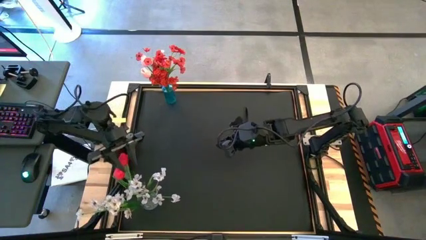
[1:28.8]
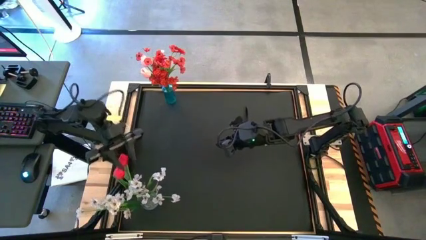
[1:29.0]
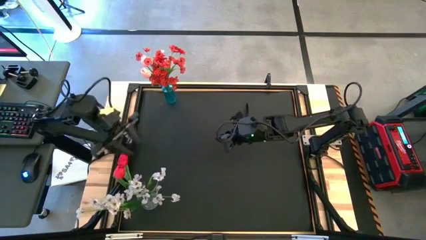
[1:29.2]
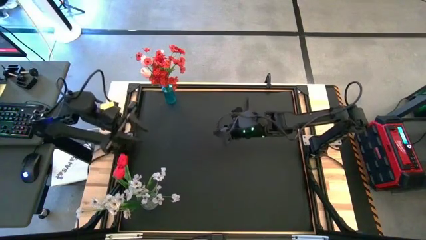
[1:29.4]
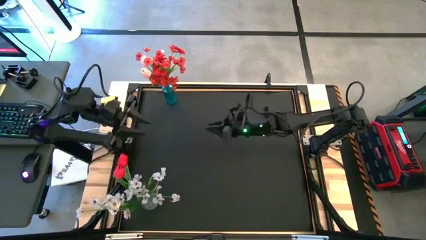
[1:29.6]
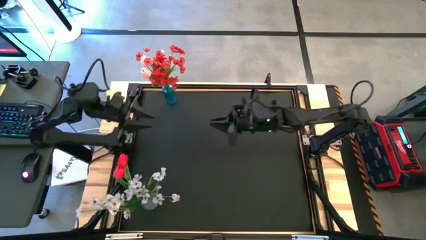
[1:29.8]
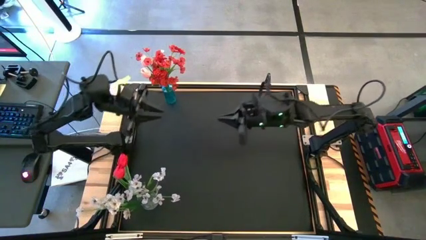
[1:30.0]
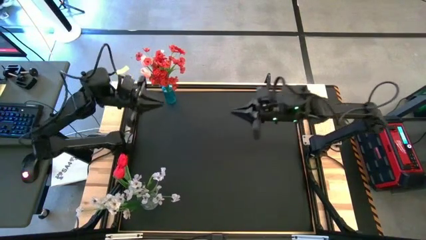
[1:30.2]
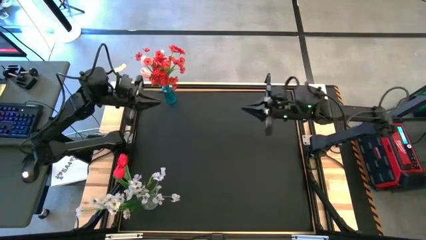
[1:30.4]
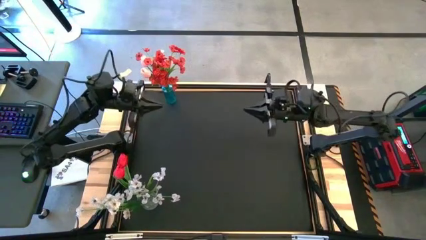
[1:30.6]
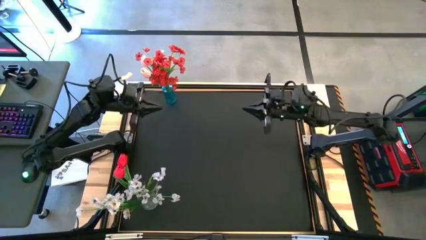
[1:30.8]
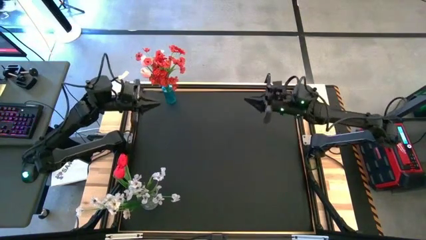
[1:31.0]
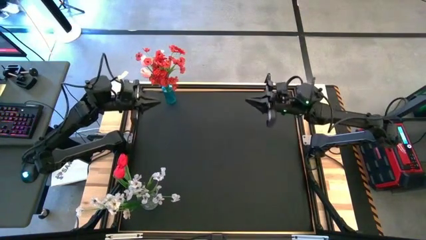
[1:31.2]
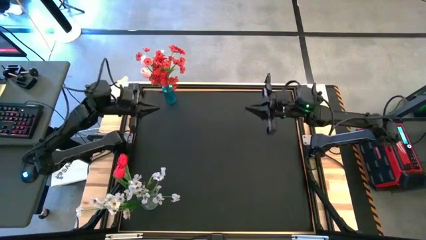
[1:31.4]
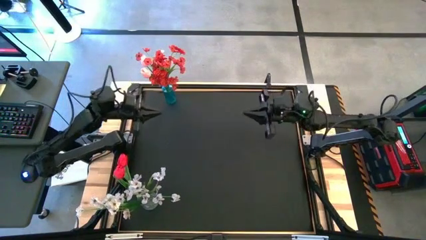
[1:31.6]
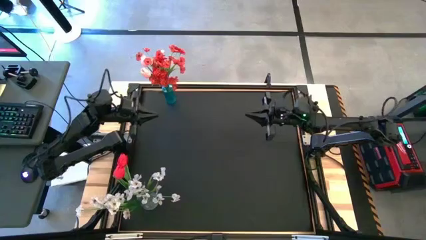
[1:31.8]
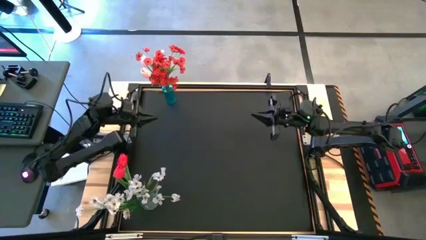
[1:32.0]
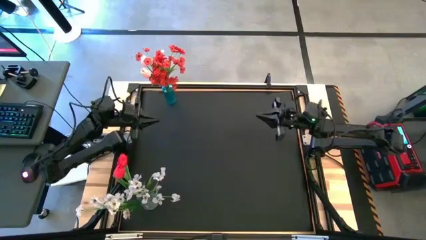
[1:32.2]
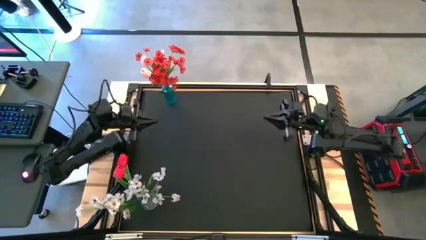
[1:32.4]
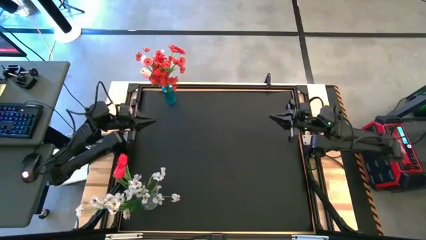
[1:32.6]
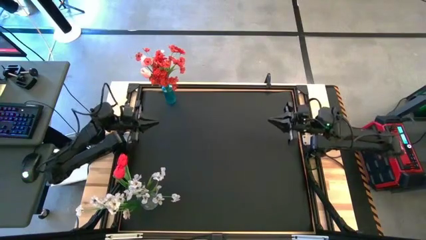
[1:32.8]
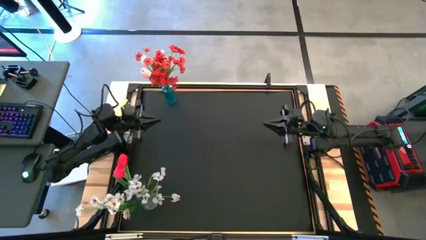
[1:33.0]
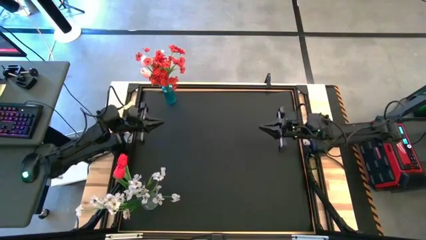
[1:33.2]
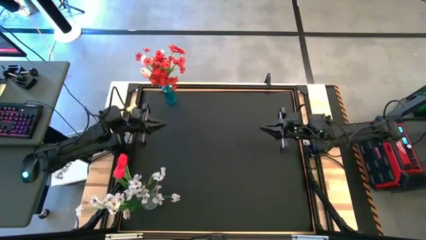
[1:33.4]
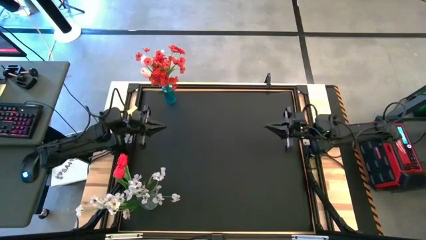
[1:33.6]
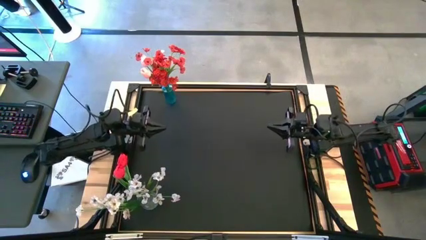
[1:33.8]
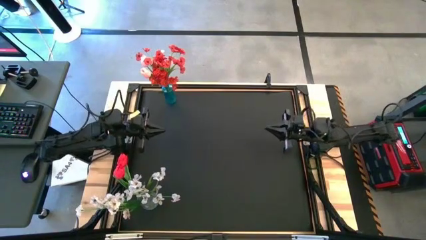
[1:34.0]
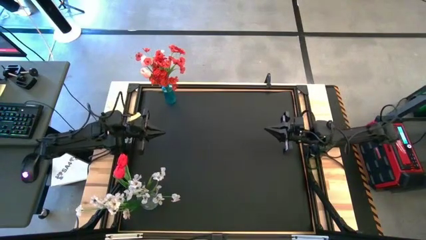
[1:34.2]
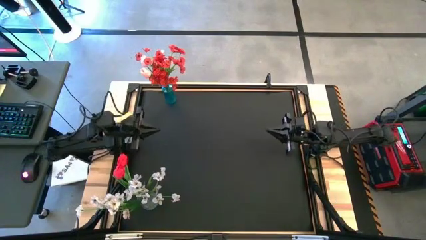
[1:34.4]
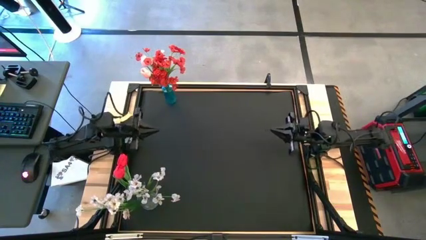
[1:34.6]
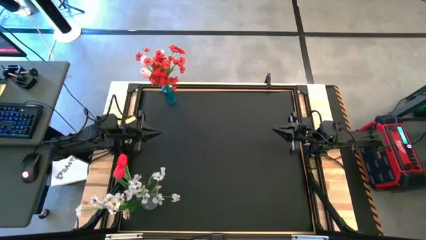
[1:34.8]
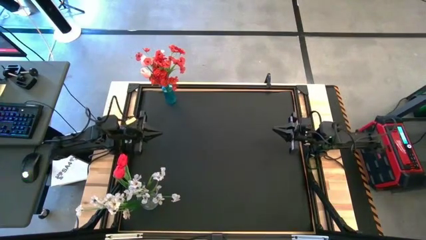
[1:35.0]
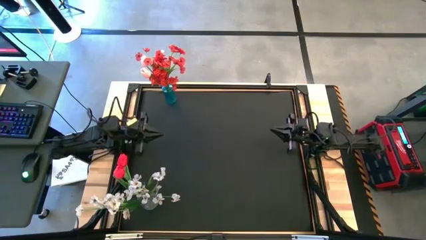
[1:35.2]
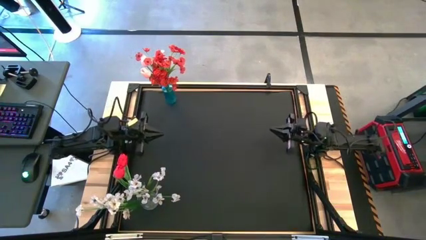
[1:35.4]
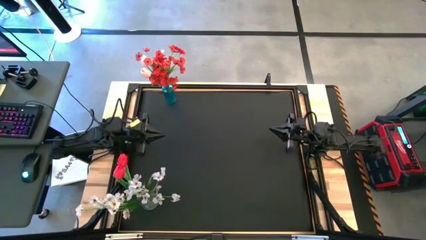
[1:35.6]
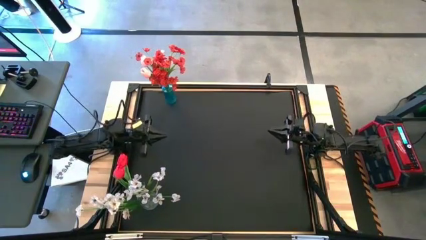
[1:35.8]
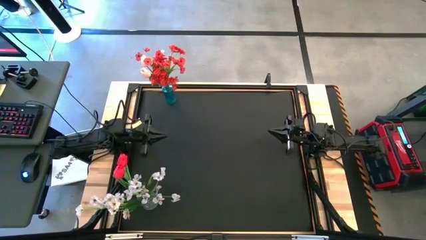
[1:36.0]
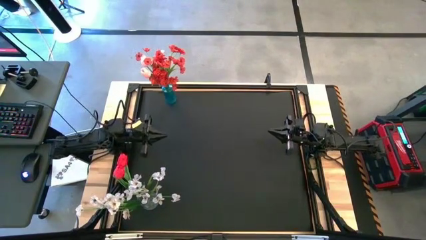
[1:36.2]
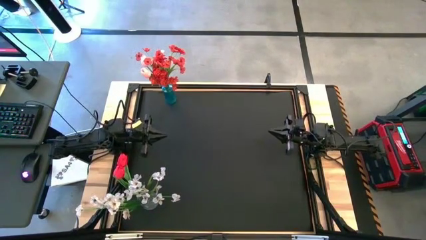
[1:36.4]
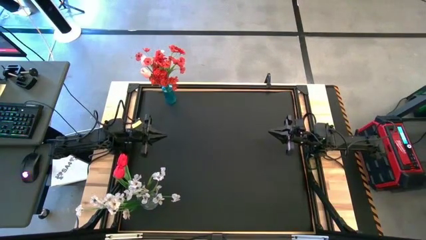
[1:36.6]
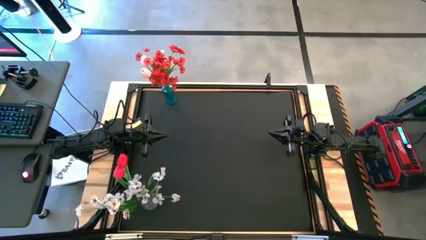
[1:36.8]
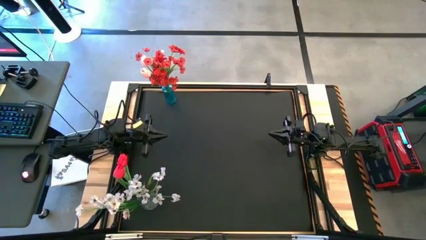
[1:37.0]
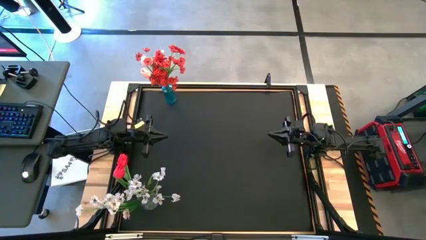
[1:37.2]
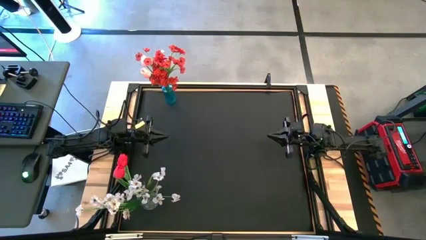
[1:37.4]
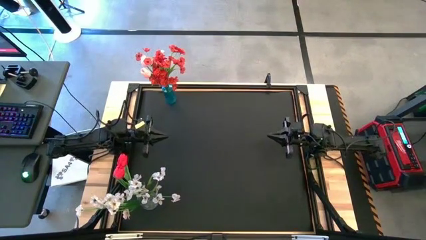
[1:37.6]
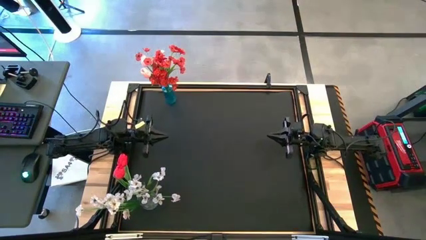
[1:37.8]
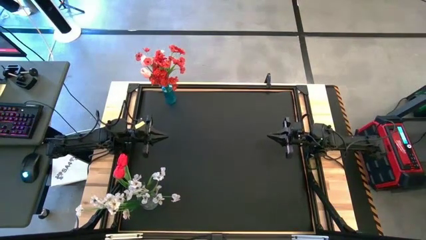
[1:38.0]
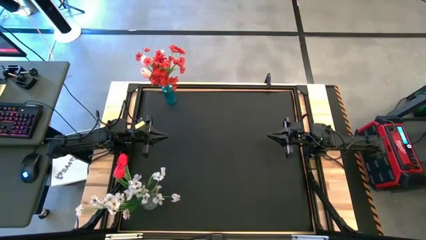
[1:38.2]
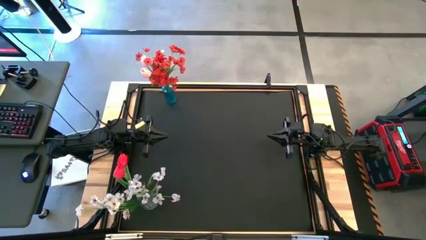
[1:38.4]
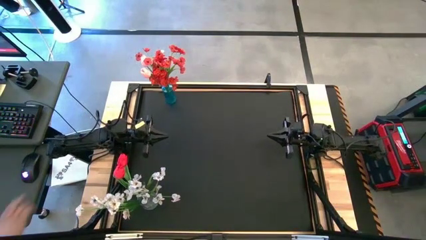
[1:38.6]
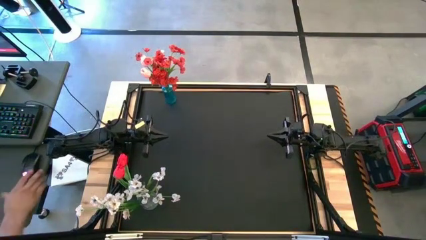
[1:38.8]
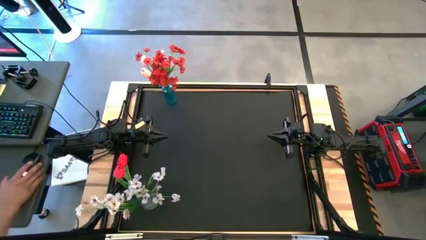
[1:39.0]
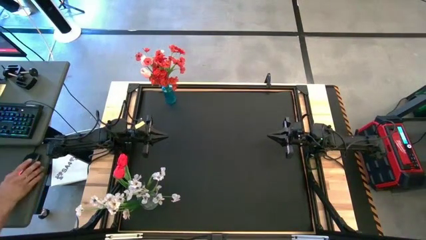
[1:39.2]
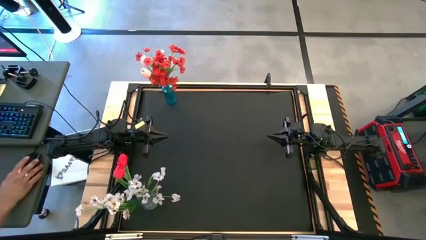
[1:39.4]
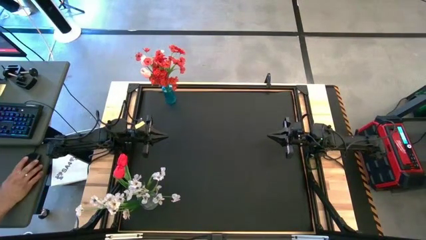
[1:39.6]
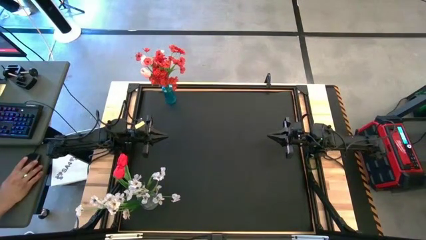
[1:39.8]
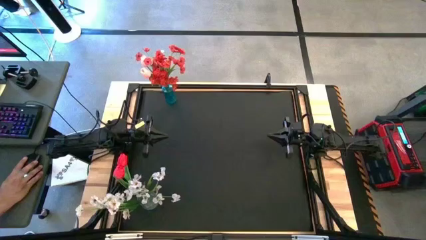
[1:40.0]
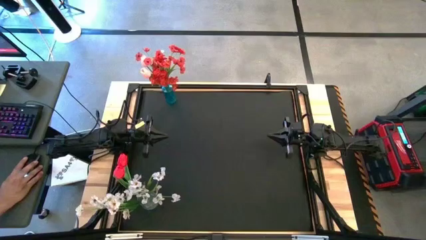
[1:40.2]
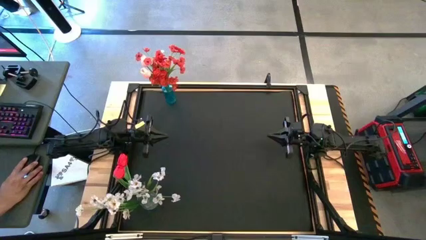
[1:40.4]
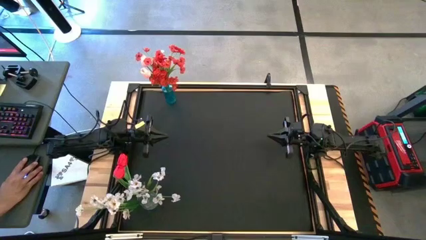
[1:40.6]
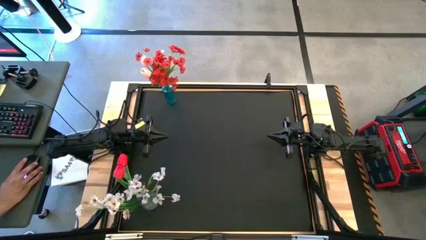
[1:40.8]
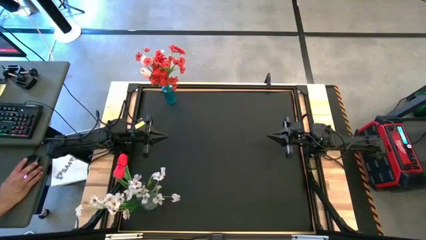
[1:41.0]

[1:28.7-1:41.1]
Task: Sort flowers into vase by color
Return to Home Position
